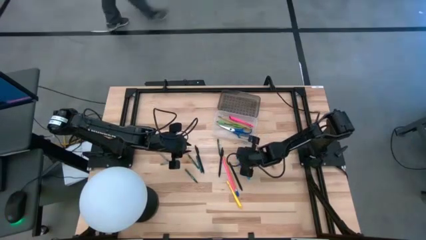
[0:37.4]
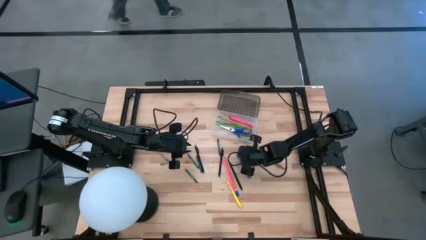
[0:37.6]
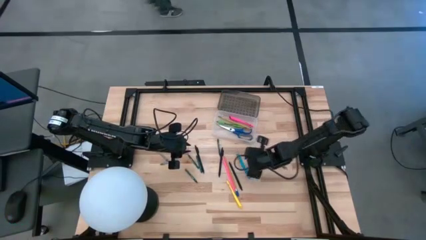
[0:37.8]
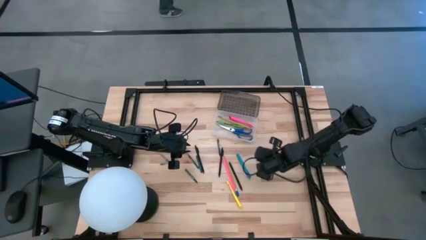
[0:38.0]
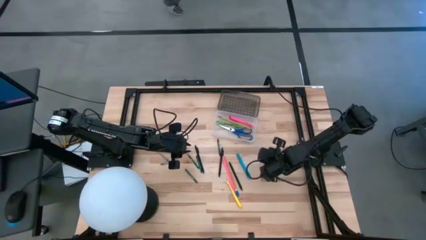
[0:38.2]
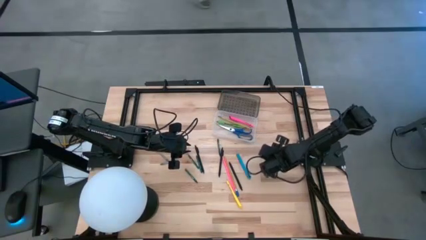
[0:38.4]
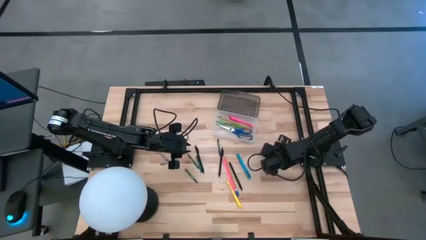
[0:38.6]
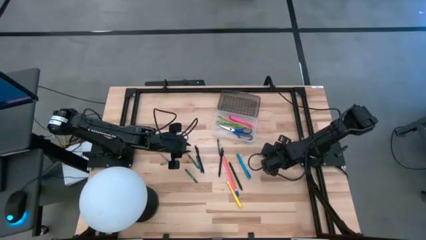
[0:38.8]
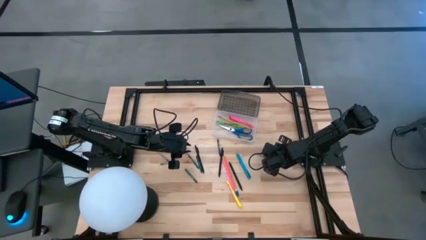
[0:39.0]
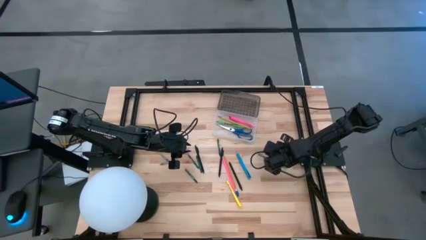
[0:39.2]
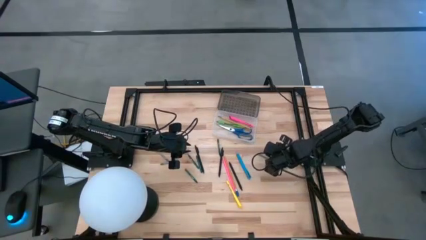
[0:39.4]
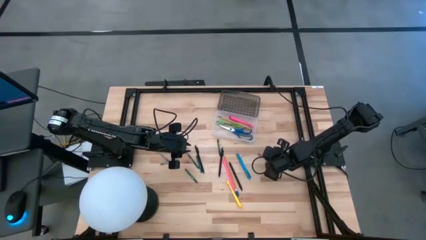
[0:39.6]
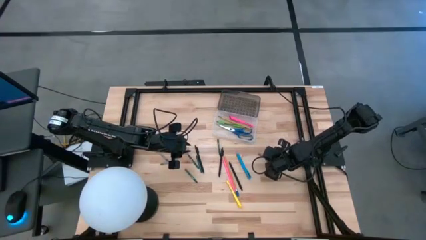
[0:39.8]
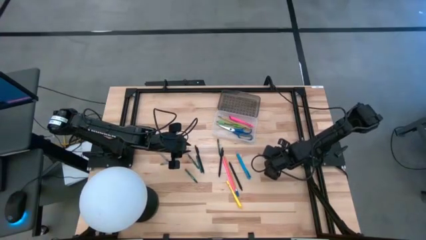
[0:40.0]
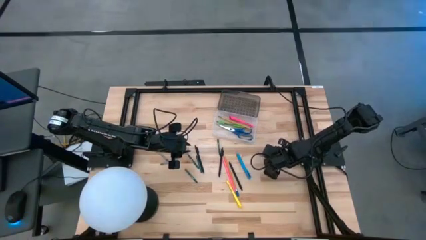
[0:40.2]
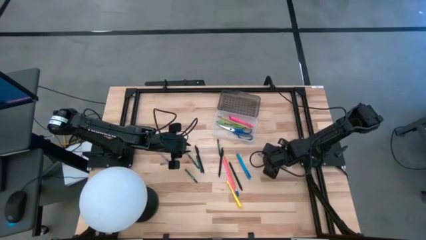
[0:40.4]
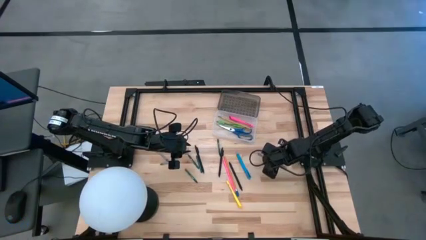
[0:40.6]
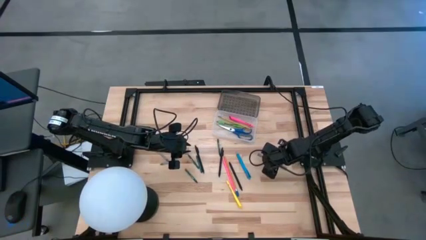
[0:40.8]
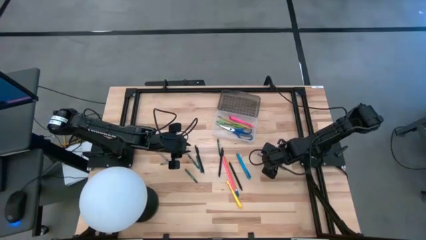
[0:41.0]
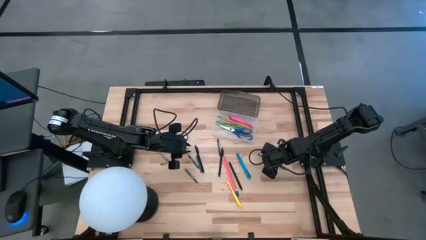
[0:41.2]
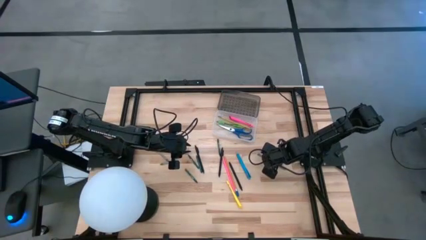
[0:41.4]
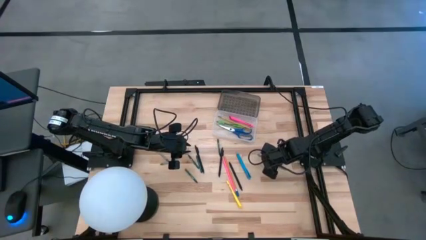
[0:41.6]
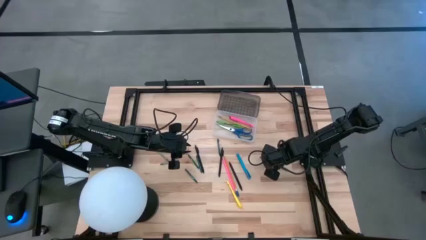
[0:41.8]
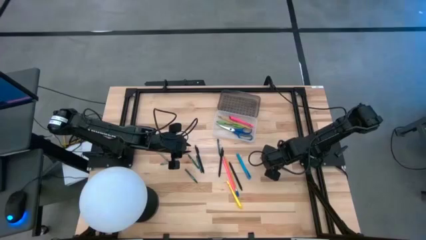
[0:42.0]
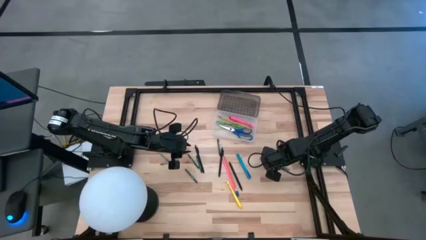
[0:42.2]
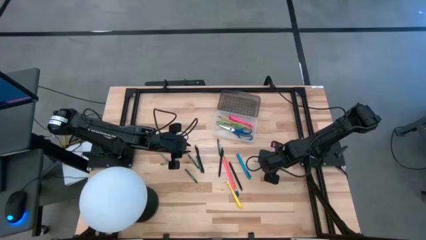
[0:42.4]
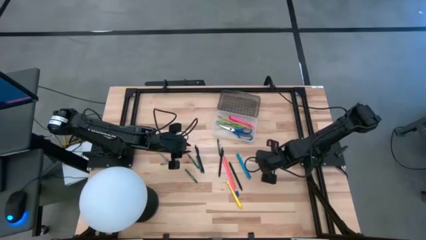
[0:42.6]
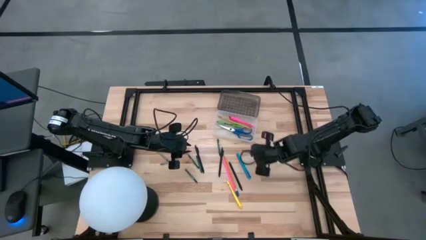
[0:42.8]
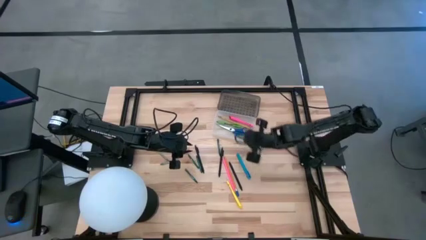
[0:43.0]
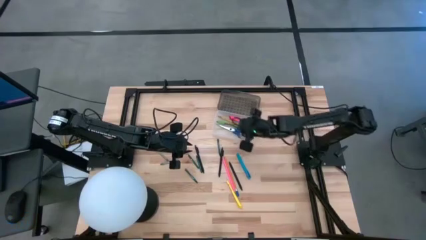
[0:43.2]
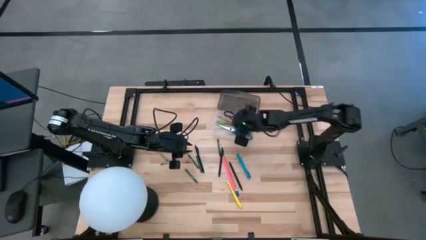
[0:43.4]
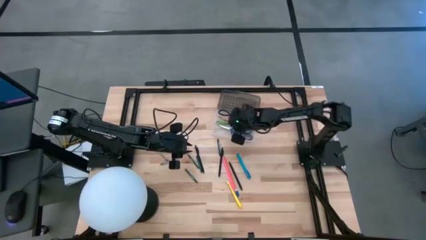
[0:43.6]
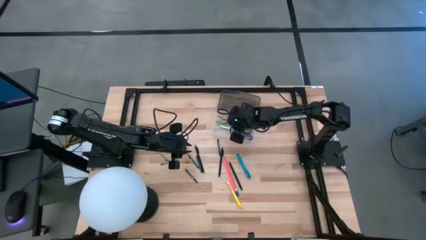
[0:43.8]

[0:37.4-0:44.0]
Task: Pick & place school supplies into a supply box
Put the gray pen into the black supply box

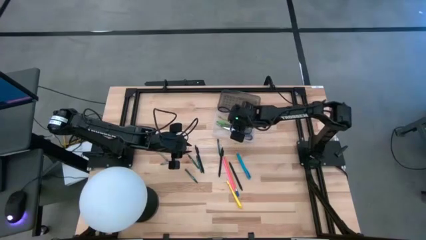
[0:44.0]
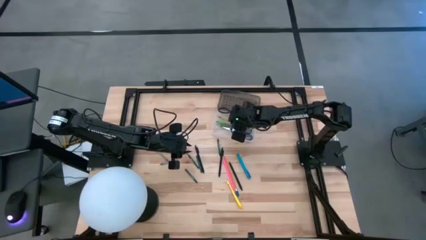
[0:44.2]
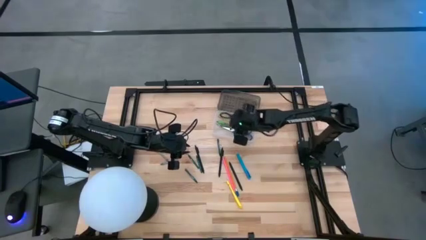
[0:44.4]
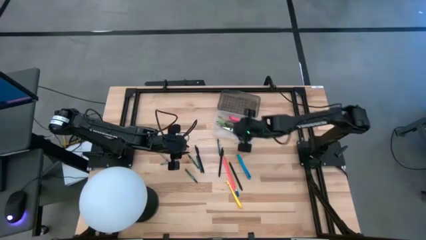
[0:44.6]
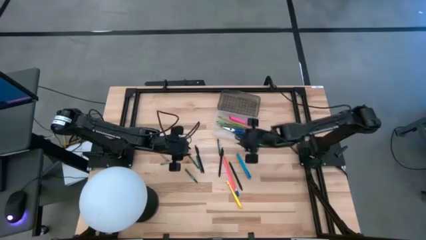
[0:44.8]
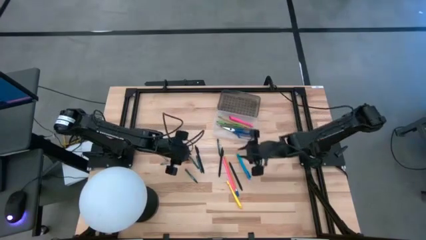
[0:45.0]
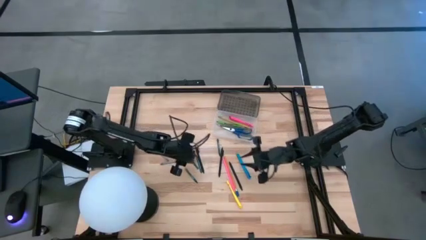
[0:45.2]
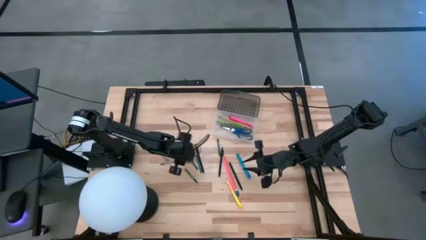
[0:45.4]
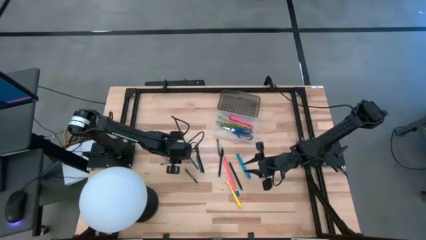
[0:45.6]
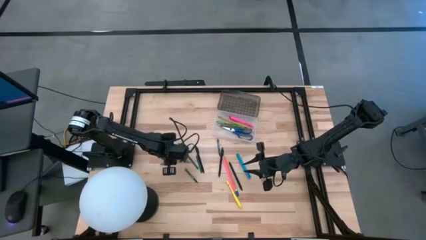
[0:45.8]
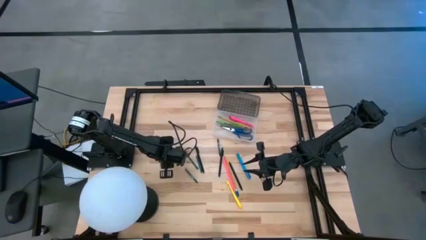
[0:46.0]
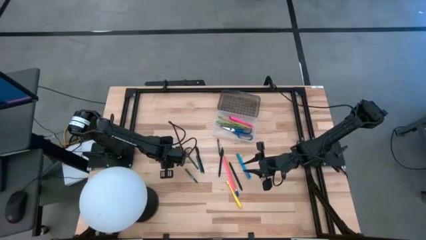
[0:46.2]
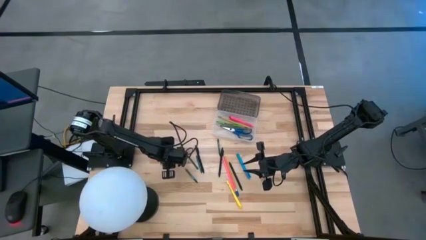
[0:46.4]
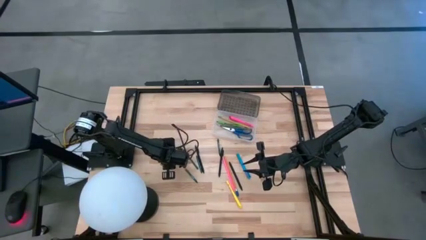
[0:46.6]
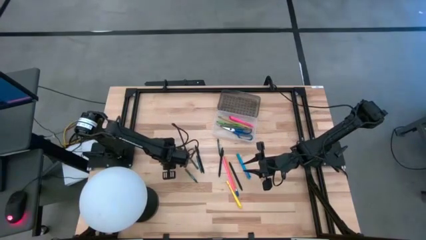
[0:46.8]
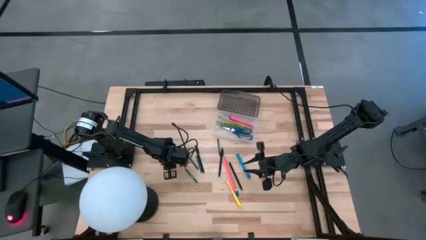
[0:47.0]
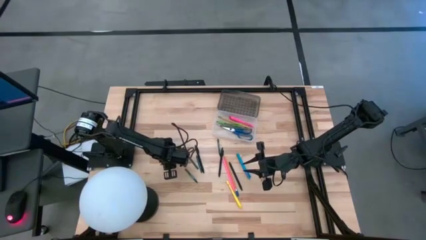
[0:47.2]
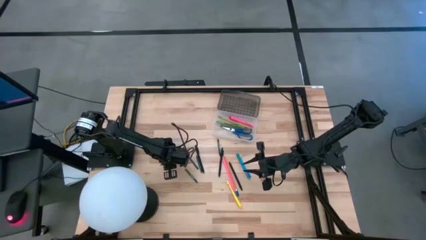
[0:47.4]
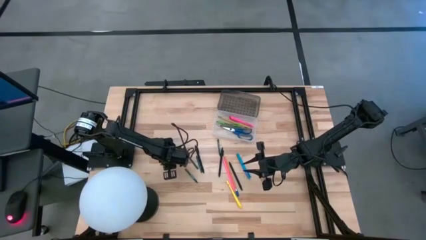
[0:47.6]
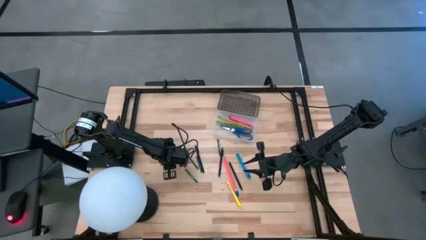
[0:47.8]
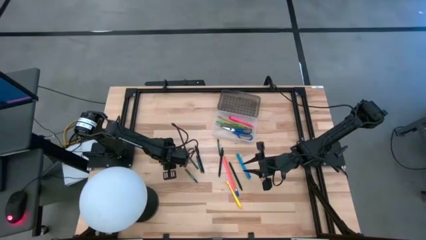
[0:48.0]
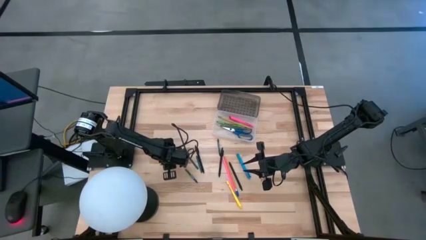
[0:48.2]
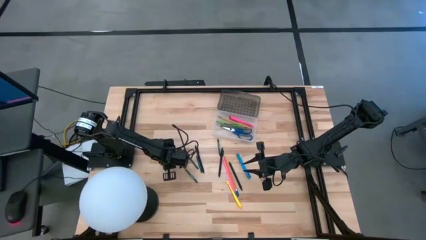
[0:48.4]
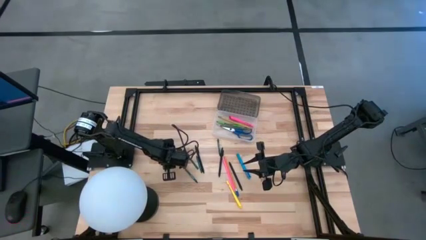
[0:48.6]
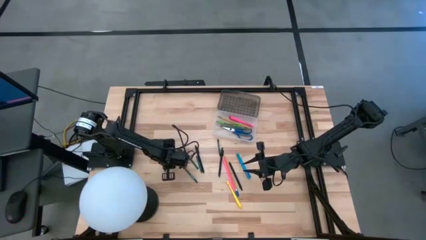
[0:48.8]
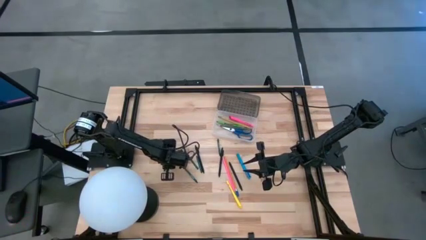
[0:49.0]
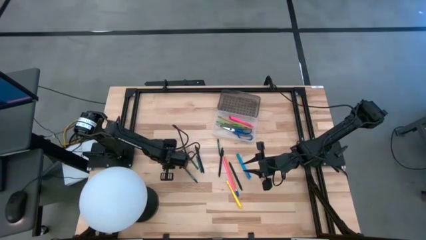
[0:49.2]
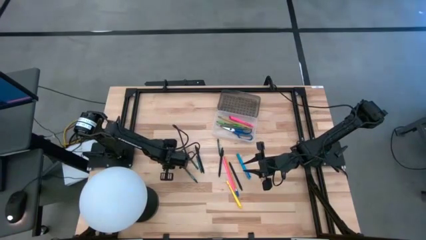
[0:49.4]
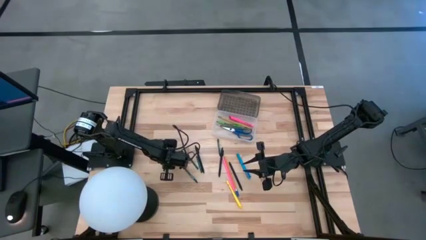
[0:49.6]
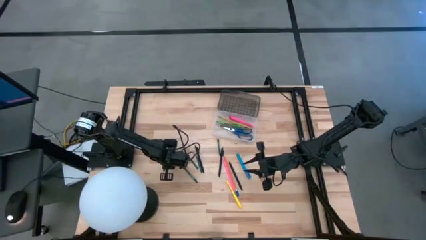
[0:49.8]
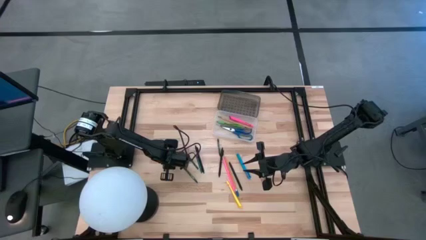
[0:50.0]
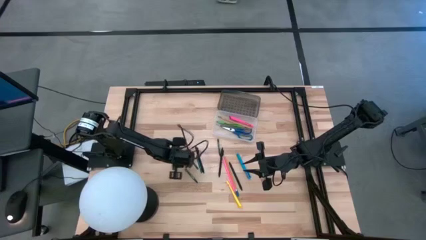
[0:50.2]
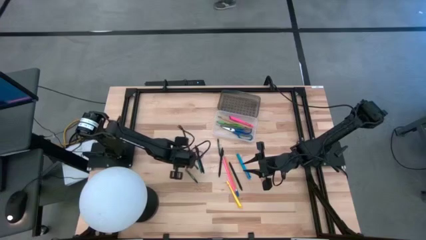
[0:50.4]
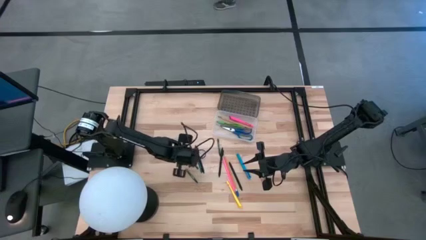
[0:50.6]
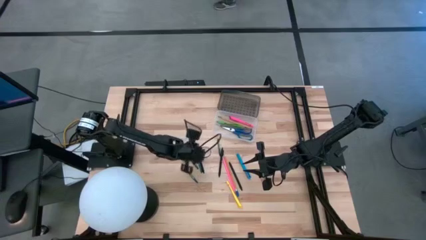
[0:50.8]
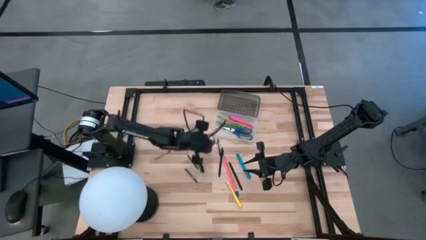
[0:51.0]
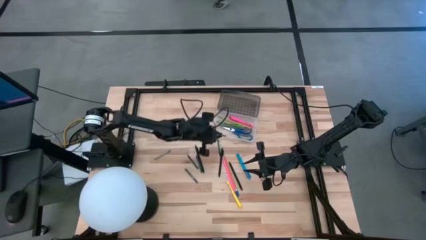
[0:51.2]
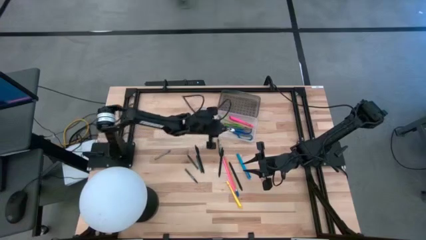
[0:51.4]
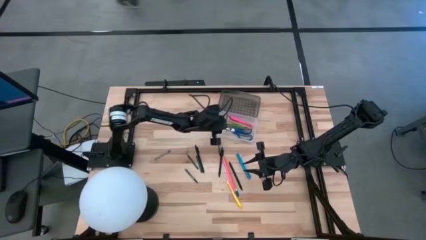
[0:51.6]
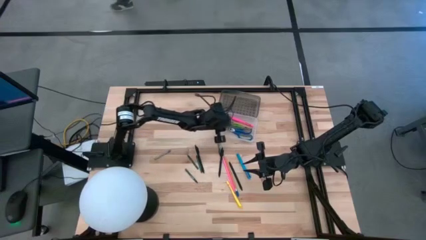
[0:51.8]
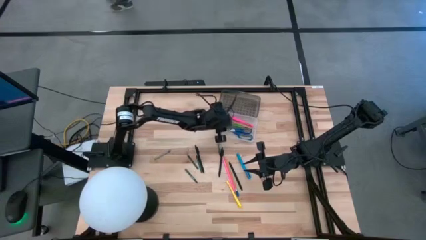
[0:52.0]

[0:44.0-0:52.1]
Put the top gray crayon into the black supply box

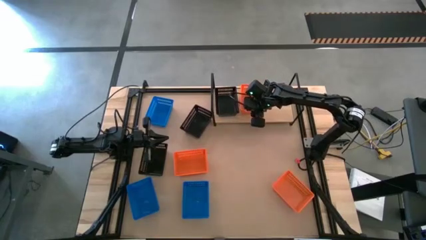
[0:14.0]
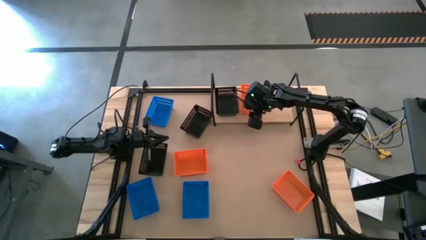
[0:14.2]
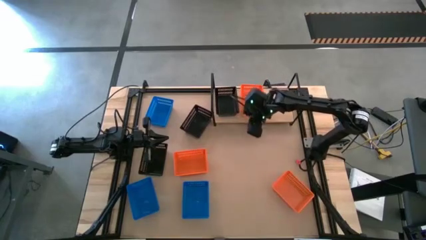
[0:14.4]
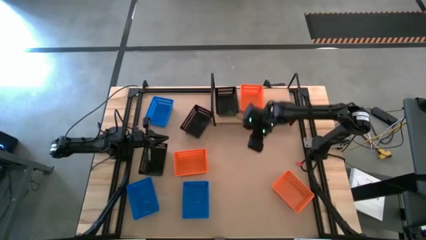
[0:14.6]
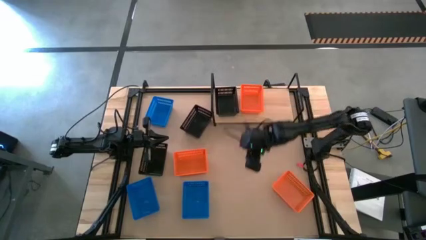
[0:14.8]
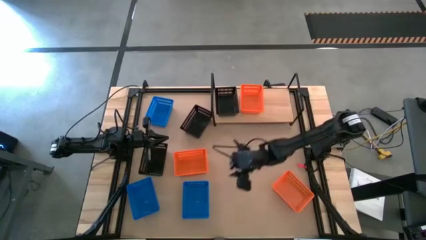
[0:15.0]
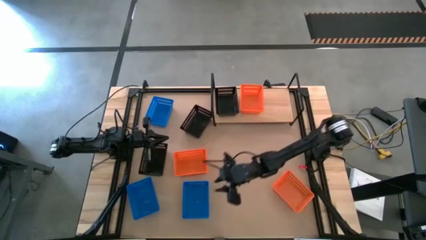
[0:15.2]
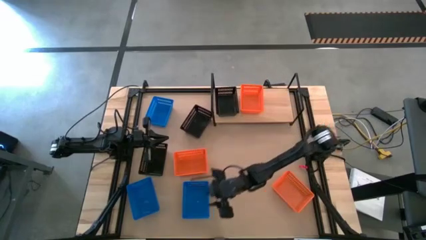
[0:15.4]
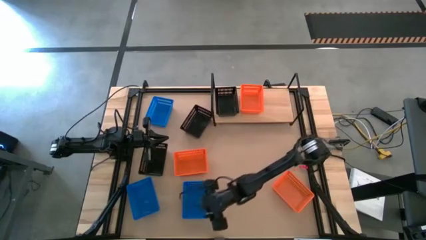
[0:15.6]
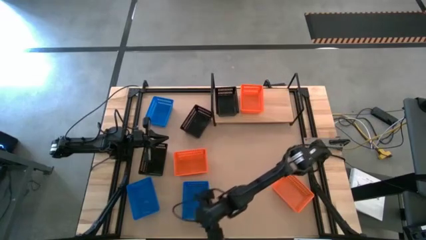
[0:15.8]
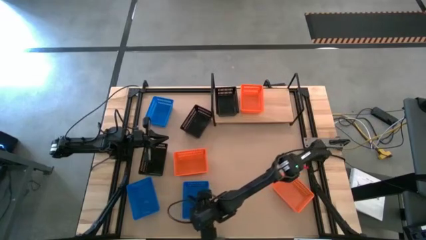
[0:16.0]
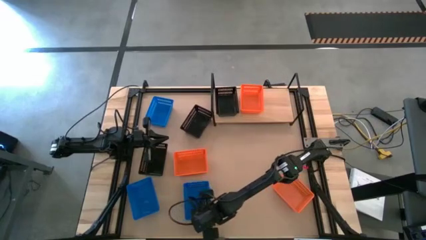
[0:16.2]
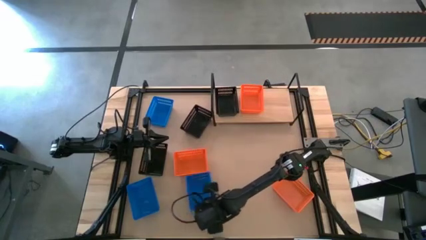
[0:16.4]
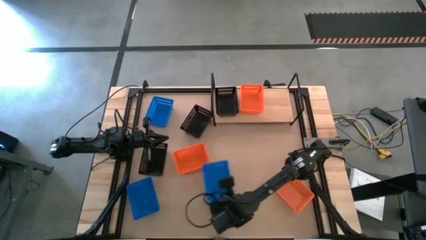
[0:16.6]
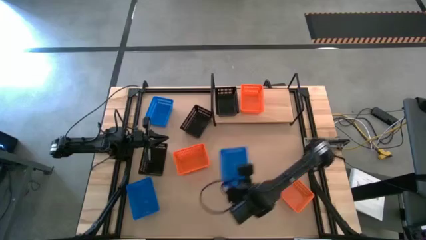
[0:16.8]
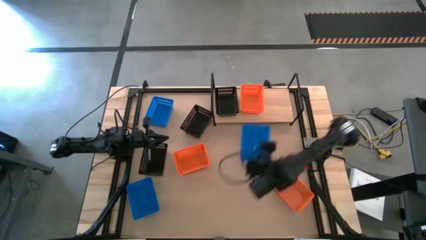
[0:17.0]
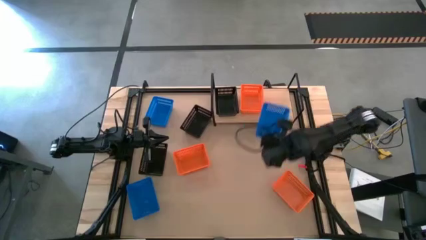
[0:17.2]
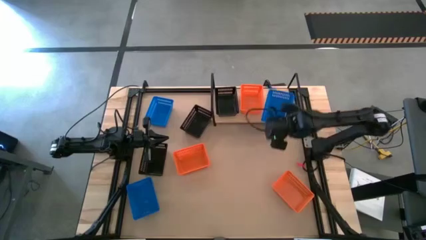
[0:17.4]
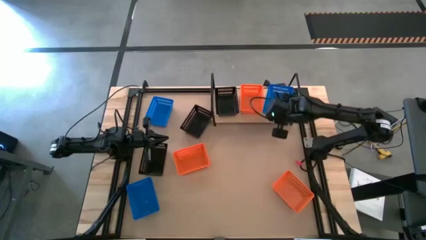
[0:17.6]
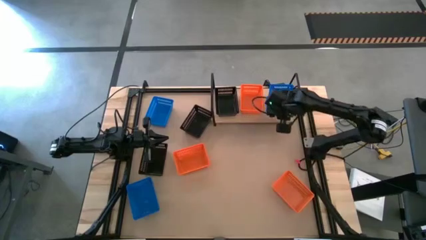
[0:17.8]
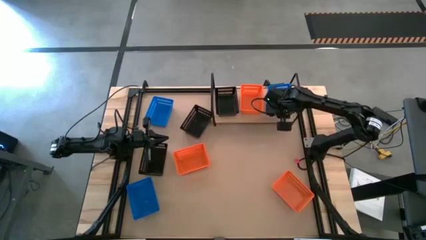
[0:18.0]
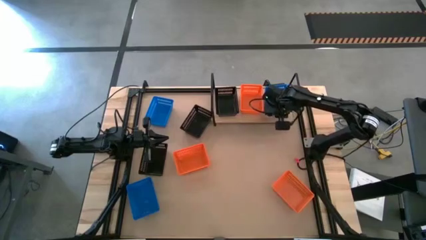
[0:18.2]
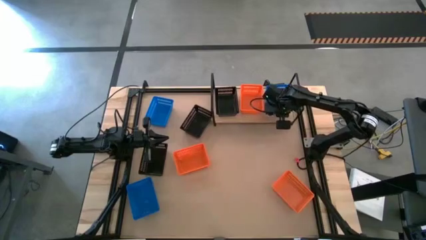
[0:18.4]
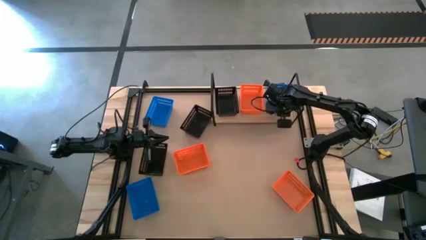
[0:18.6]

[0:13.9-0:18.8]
Task: Stack baskets on shelf by color
Put the bottom right blue bin on the shelf
